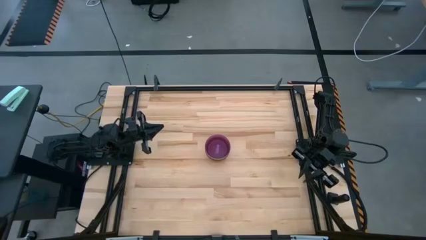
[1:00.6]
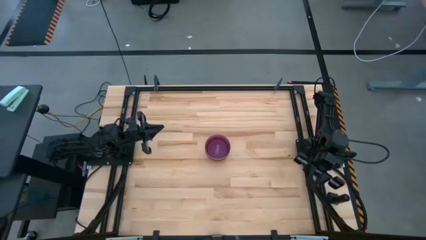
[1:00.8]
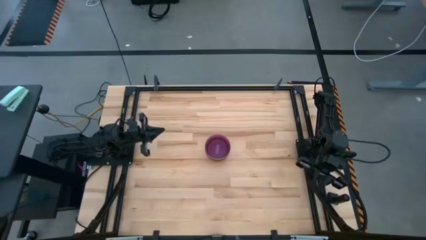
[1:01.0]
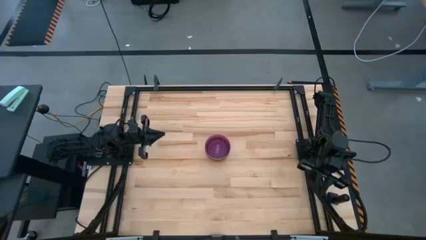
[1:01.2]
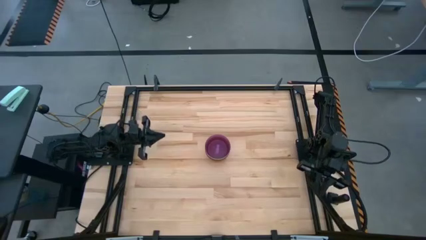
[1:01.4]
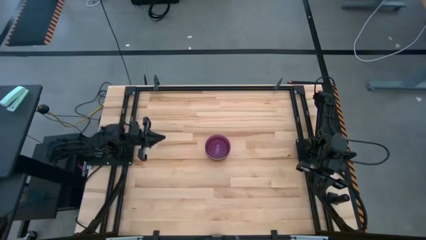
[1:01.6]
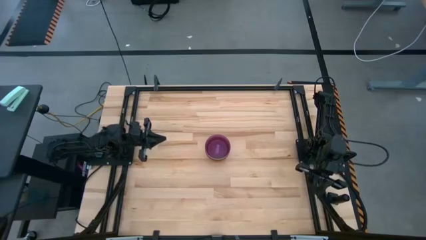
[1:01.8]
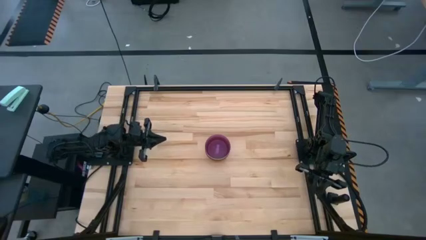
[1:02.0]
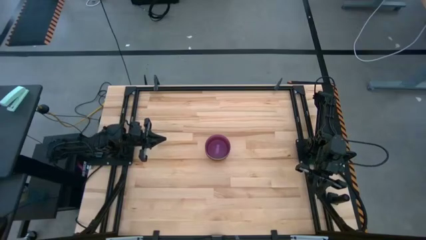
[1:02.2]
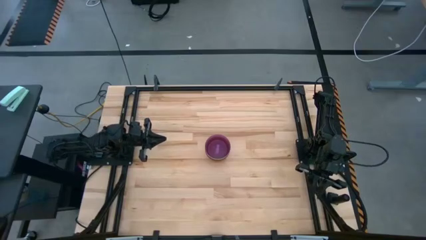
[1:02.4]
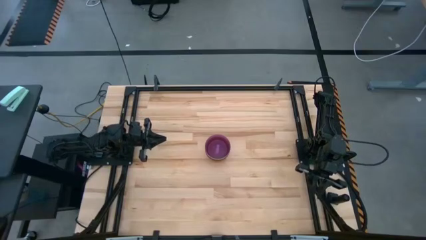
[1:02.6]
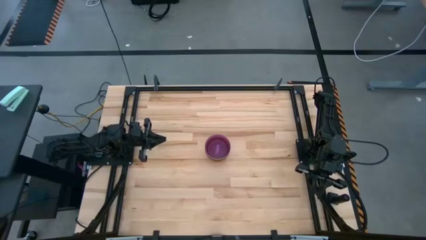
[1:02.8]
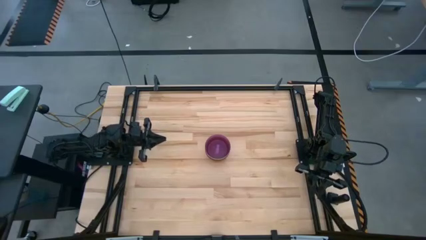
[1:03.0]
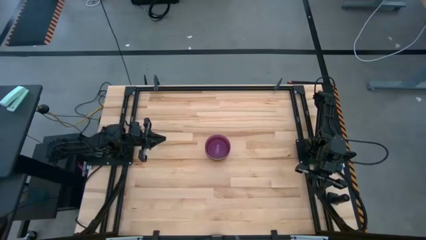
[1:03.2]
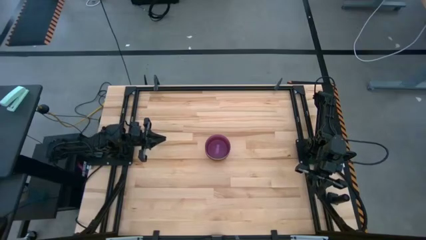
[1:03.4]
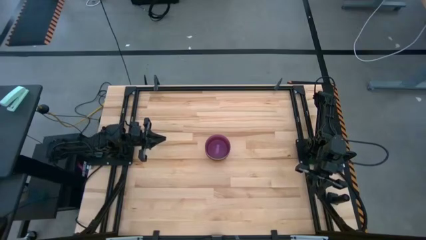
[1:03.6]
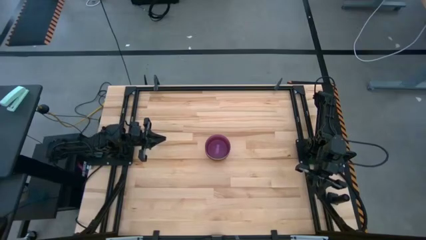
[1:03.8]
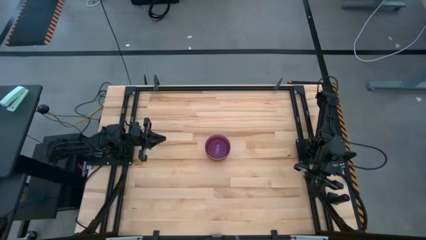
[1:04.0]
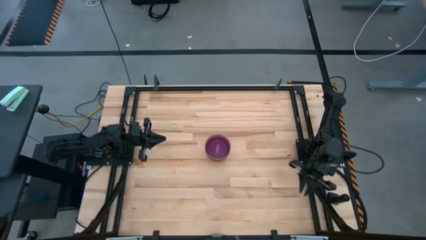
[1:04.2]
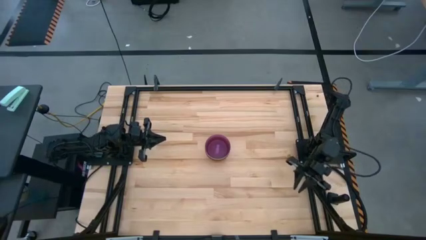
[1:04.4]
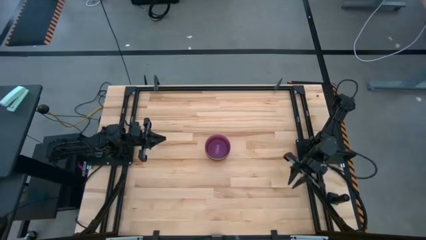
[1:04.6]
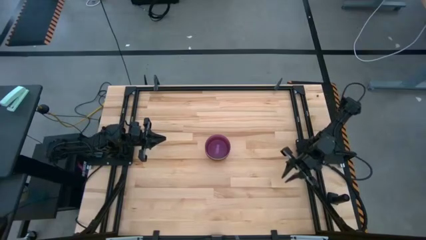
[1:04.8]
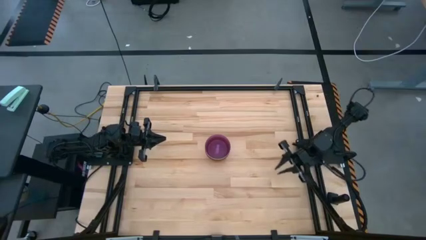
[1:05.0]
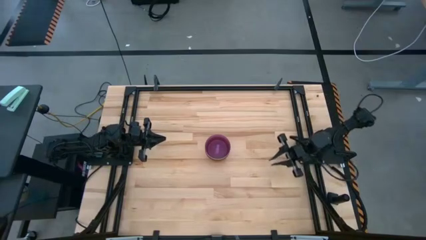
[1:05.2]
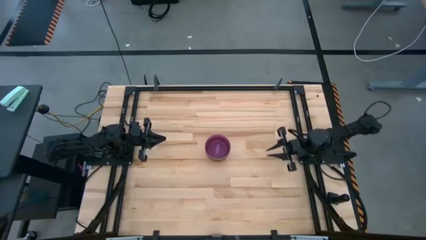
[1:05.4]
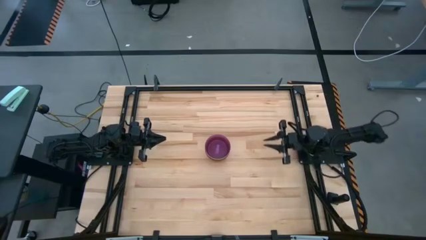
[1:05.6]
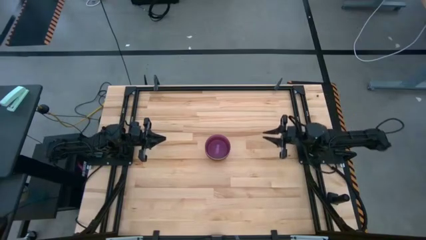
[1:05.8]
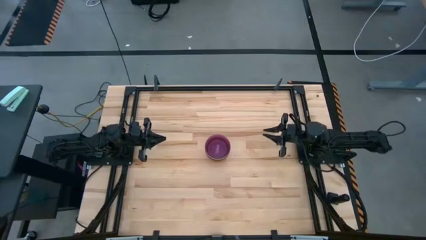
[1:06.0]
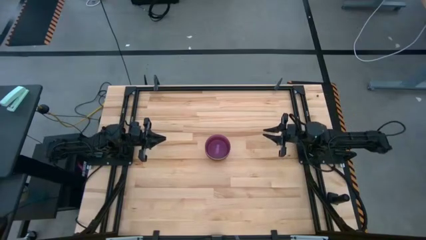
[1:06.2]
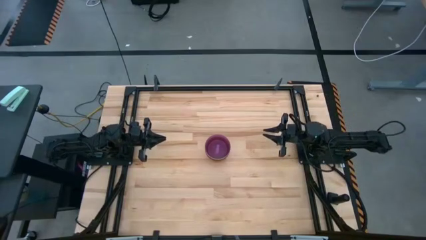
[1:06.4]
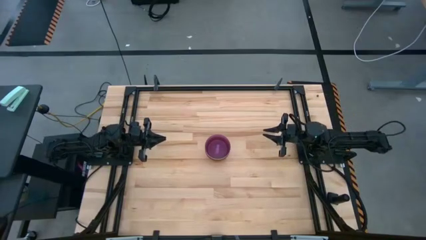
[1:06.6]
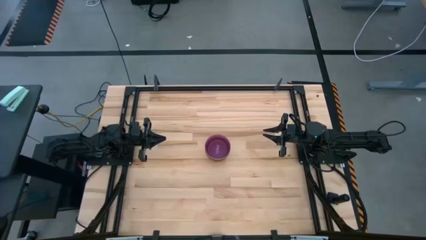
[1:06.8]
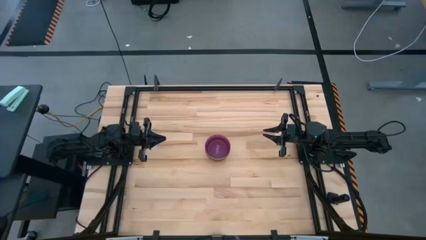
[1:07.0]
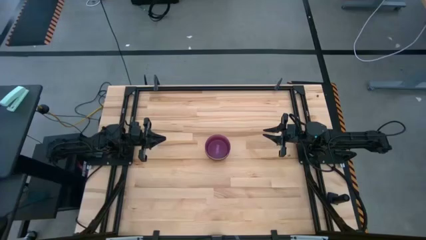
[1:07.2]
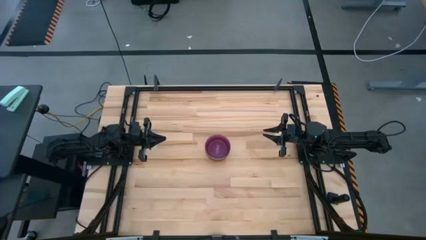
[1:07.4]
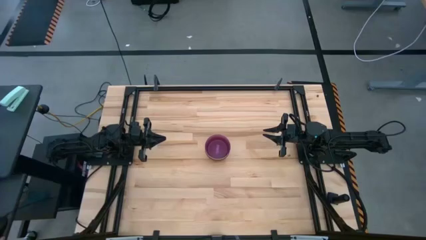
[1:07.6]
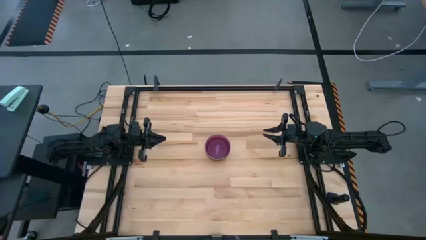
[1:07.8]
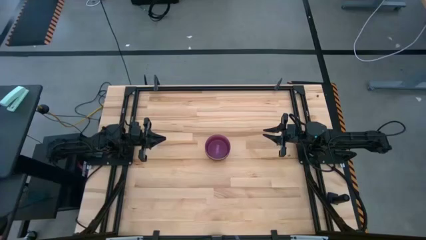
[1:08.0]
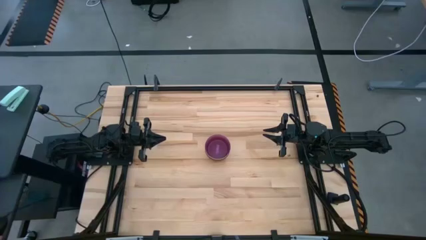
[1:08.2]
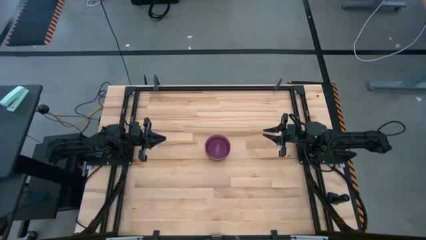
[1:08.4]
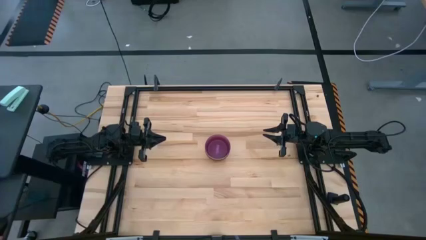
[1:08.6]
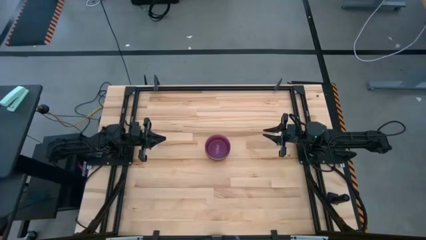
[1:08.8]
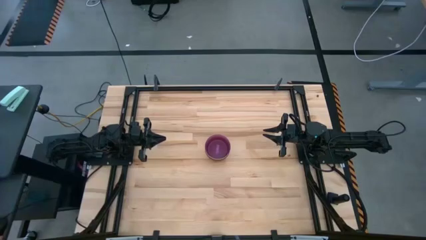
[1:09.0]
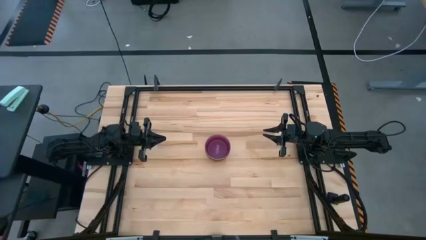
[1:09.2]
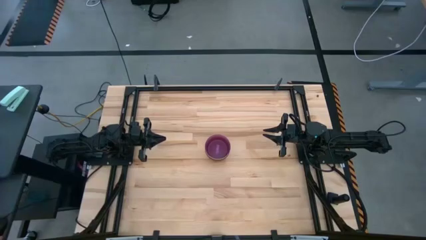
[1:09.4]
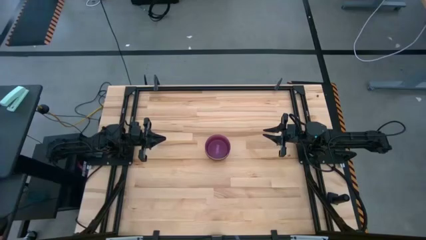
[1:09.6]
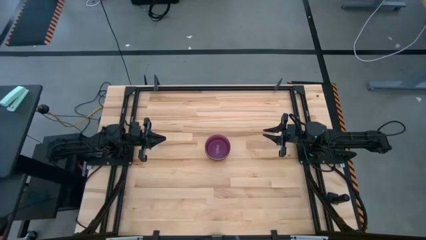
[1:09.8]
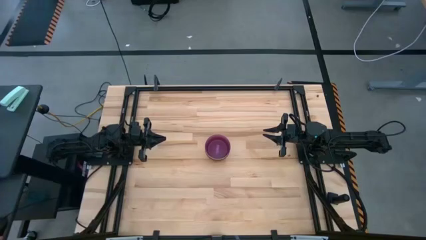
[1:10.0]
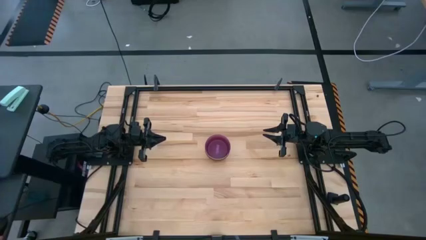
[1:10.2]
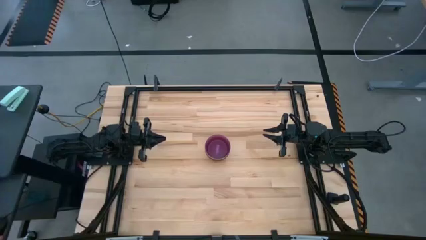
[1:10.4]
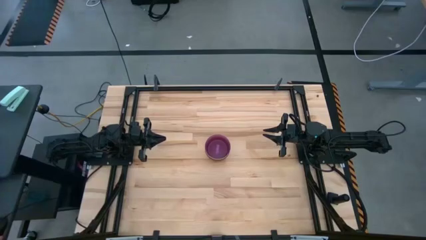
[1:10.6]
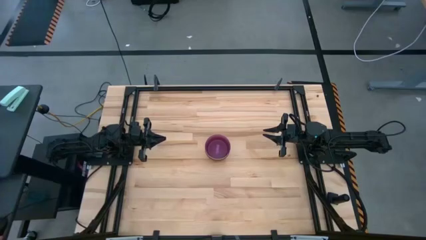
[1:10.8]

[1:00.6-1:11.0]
Task: Nest bowls inside each other
Return to Home Position

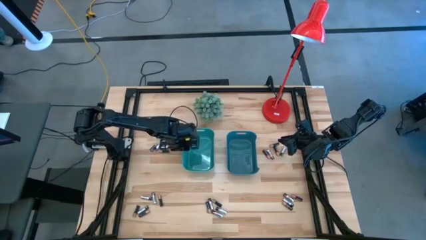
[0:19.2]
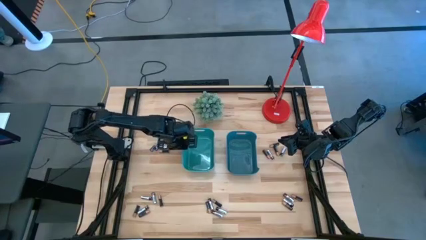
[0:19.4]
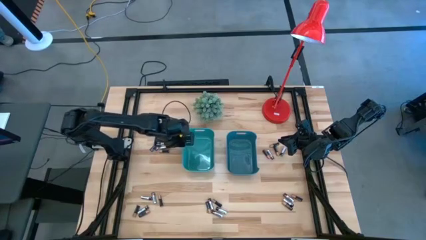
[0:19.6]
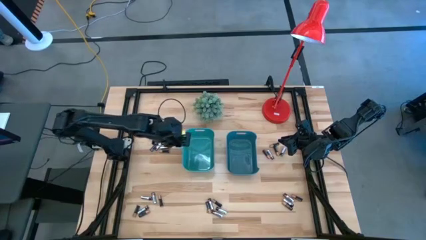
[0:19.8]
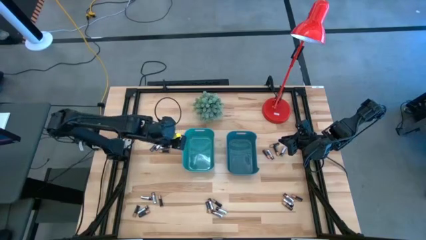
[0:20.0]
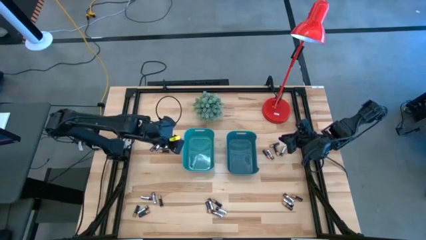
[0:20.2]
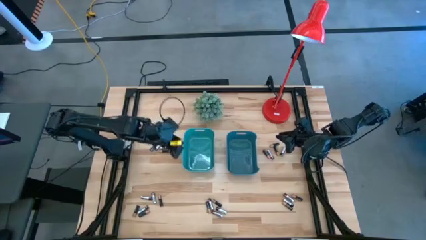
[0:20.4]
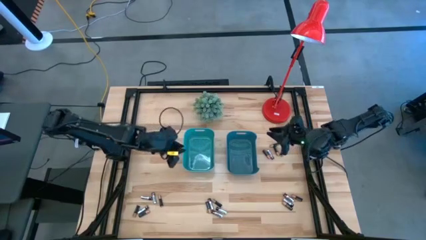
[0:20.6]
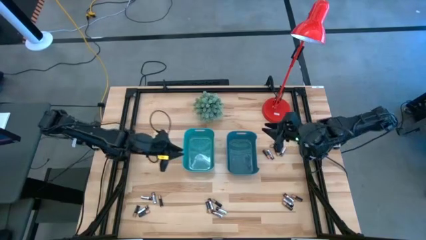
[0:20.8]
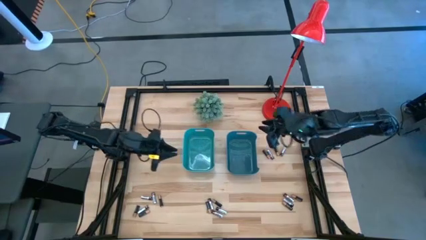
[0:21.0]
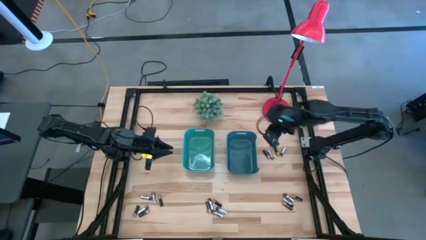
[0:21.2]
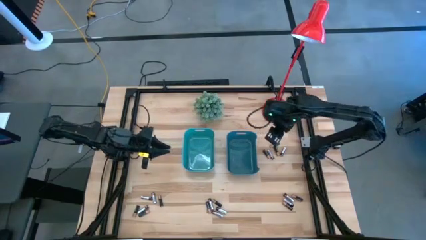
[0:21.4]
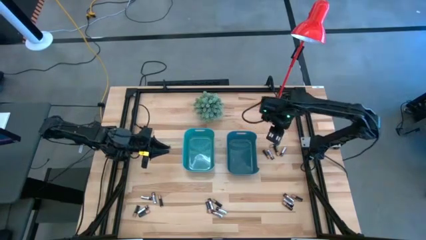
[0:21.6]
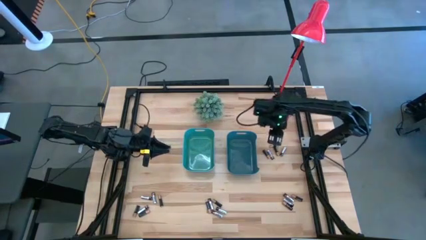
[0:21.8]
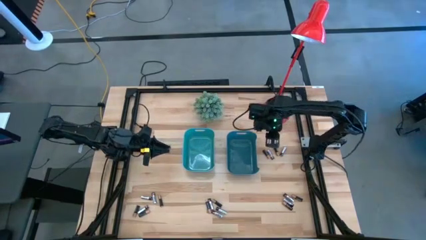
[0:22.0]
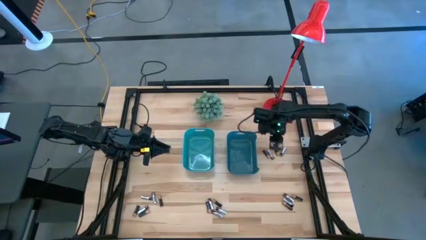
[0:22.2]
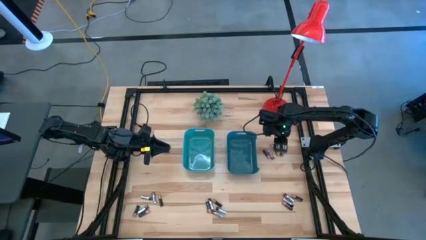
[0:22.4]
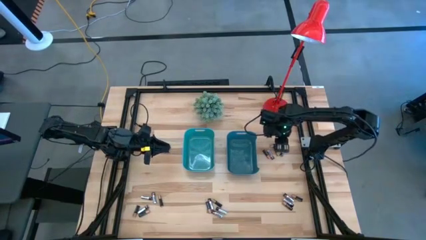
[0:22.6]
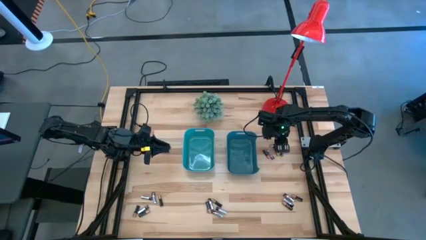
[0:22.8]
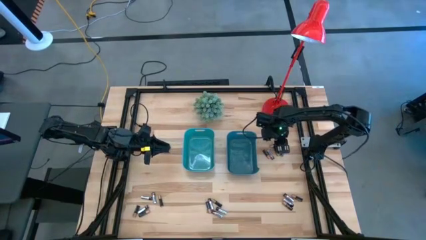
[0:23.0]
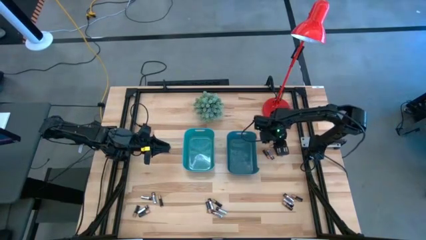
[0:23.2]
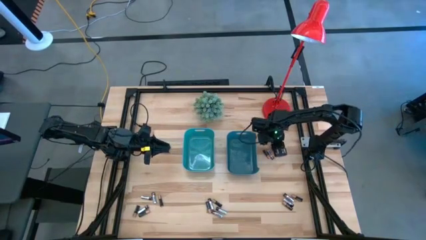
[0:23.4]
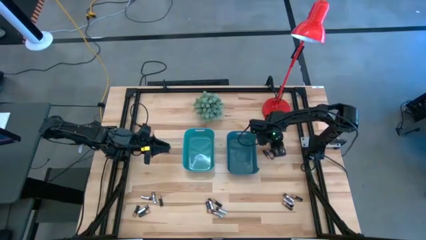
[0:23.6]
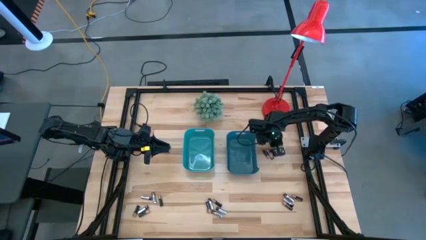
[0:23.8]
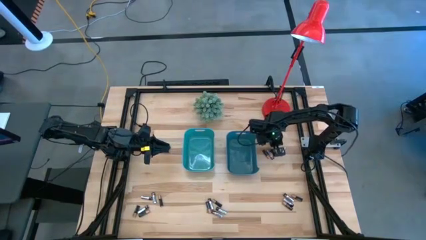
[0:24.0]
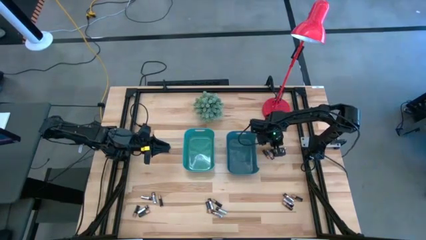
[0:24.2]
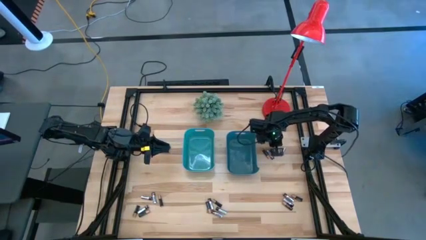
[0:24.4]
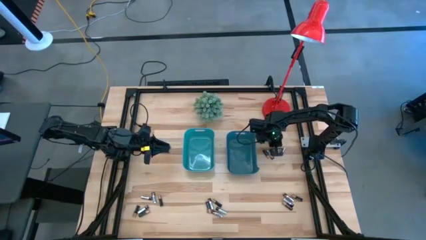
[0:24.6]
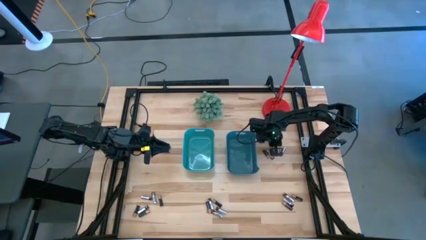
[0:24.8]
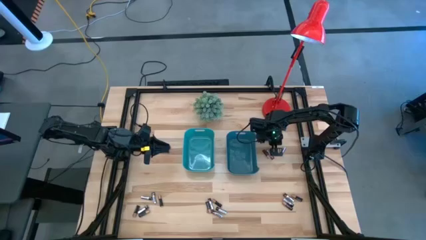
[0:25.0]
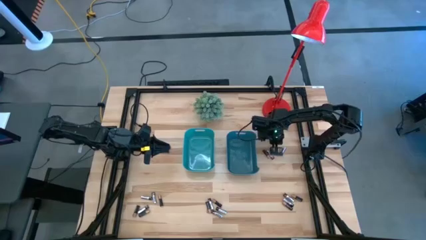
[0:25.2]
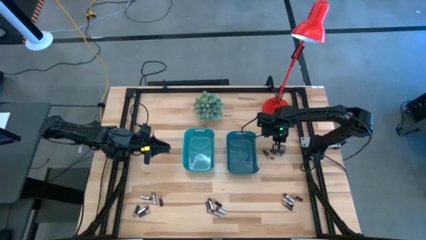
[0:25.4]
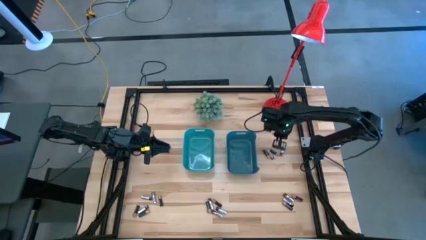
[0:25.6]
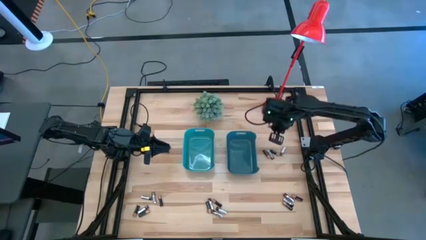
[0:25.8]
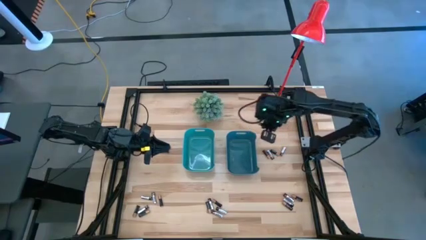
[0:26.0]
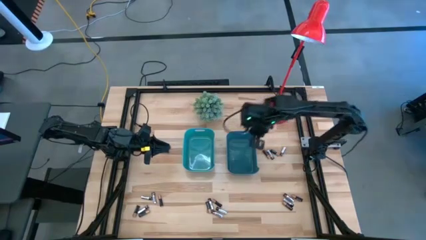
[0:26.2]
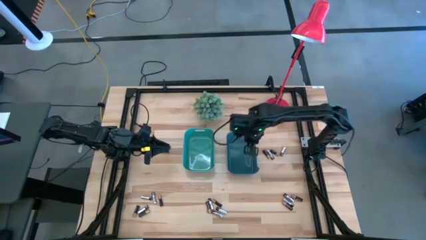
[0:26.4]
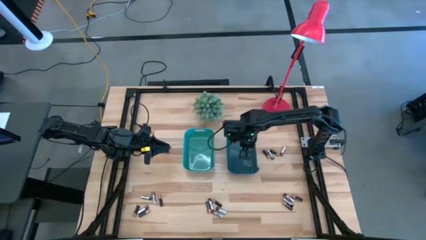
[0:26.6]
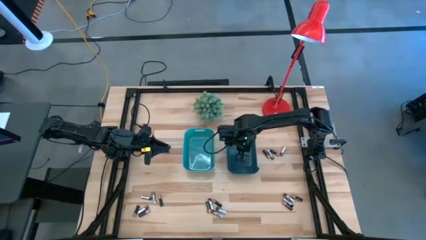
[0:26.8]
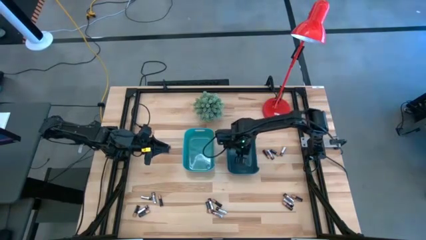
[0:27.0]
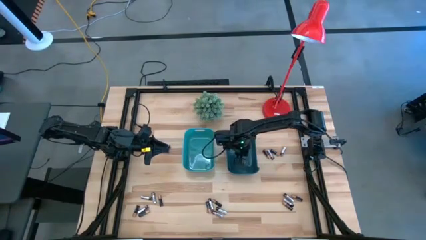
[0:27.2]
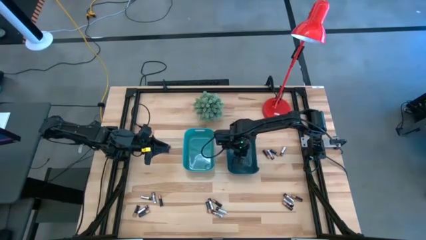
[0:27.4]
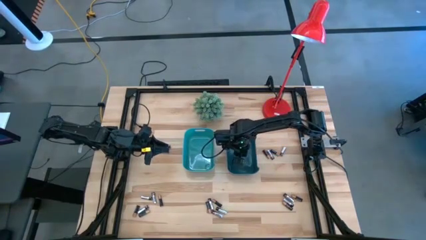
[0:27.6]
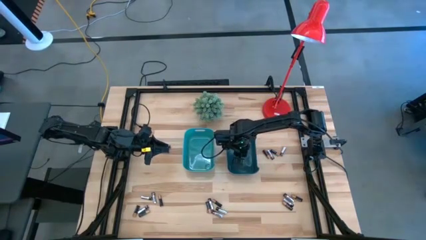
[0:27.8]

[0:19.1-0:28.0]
Task: Sort batteries
Put the black battery into the blue bin
